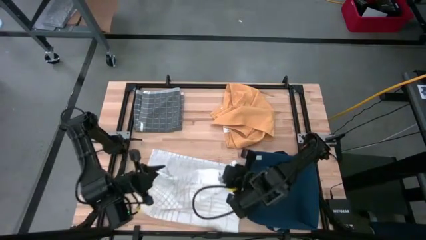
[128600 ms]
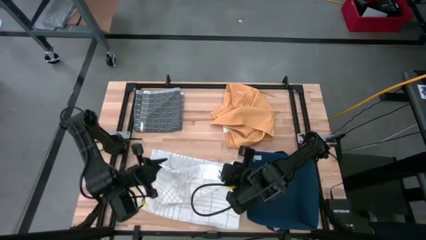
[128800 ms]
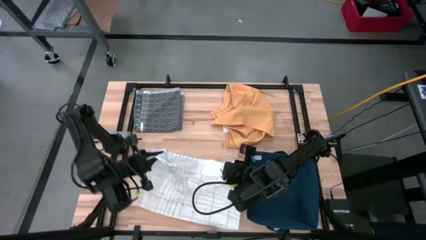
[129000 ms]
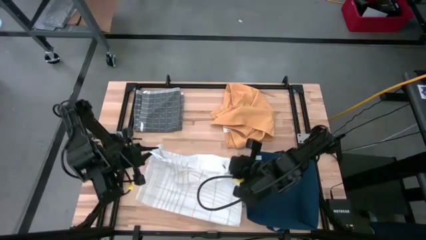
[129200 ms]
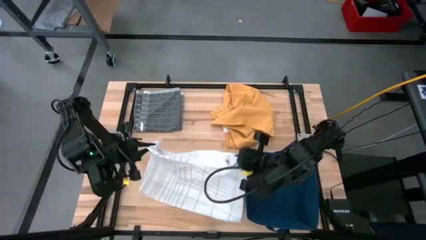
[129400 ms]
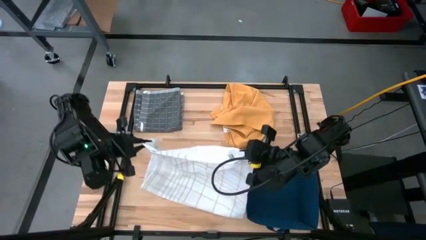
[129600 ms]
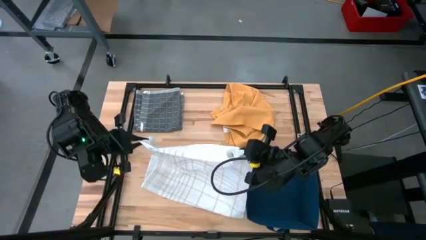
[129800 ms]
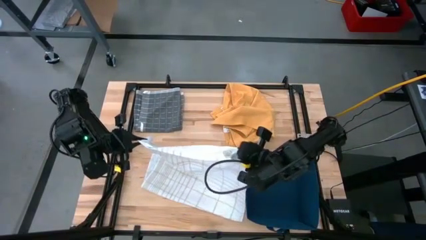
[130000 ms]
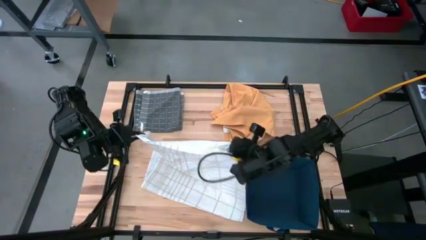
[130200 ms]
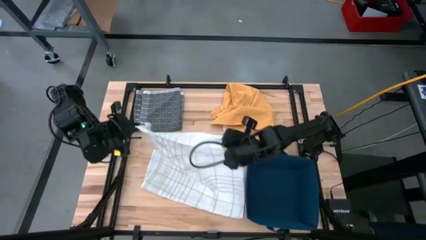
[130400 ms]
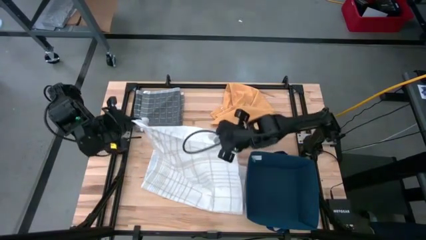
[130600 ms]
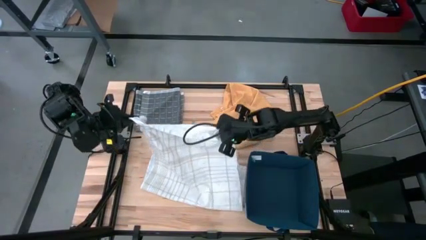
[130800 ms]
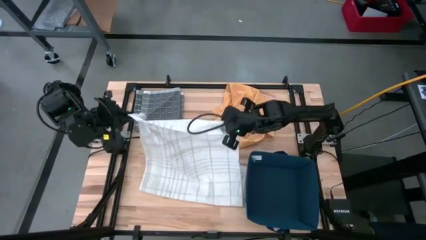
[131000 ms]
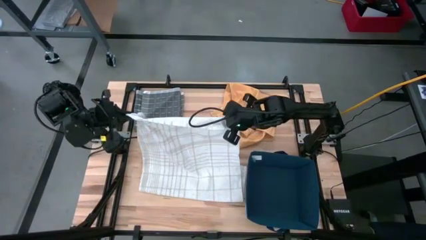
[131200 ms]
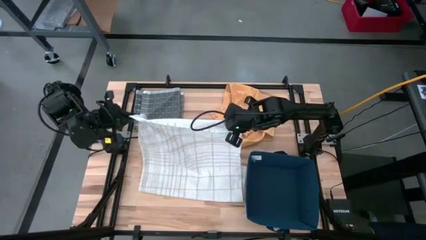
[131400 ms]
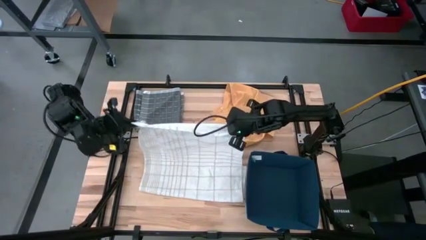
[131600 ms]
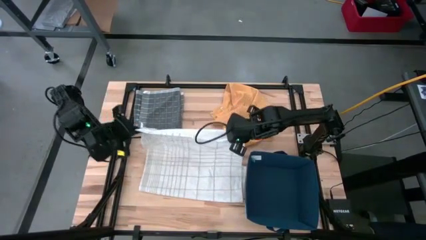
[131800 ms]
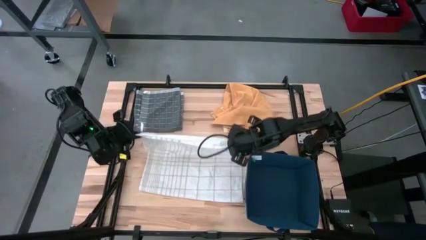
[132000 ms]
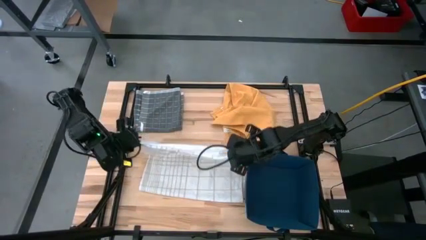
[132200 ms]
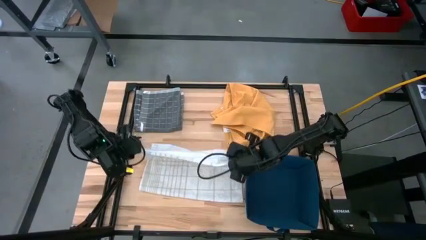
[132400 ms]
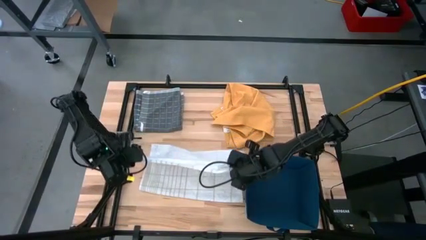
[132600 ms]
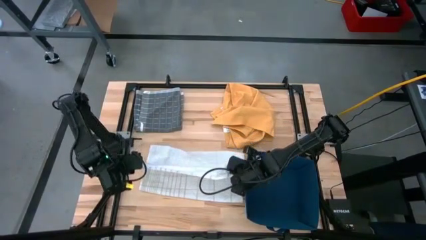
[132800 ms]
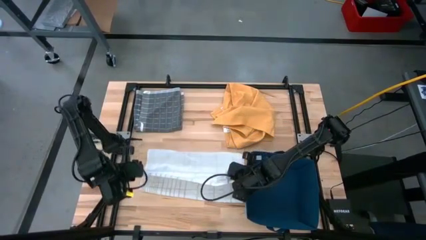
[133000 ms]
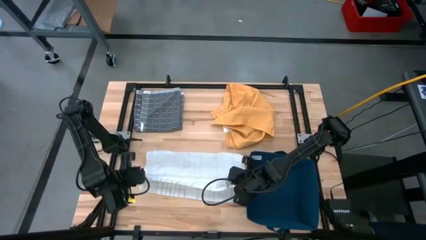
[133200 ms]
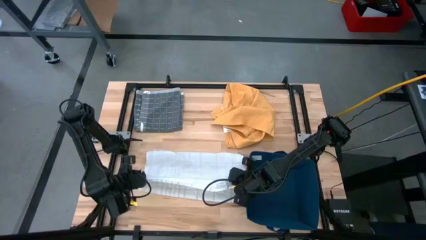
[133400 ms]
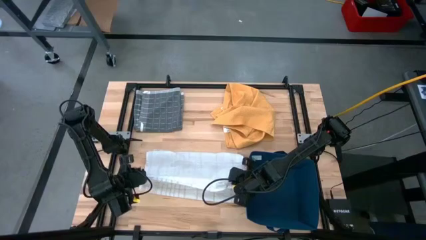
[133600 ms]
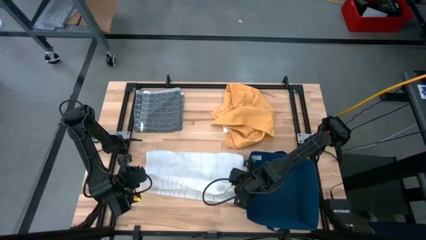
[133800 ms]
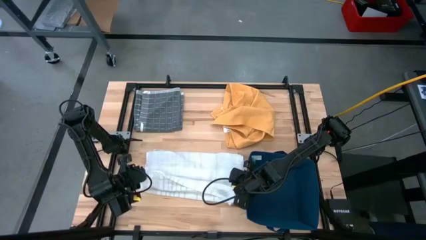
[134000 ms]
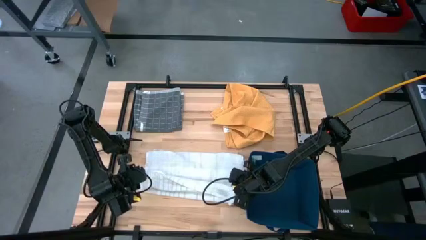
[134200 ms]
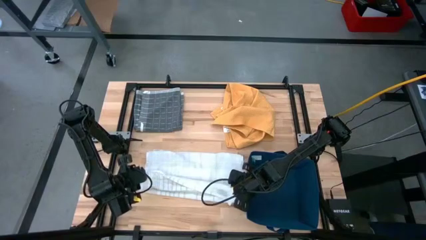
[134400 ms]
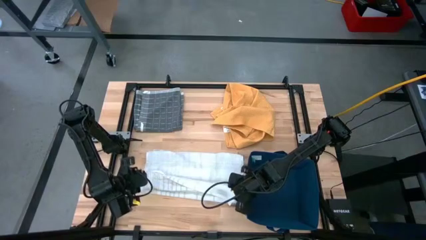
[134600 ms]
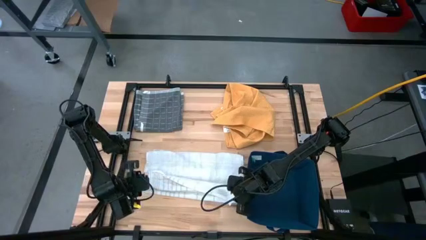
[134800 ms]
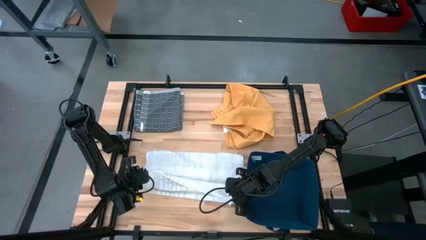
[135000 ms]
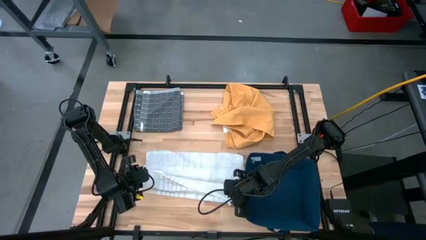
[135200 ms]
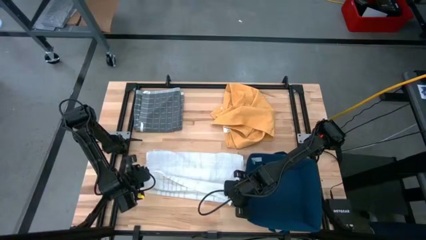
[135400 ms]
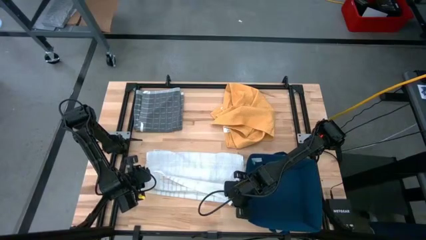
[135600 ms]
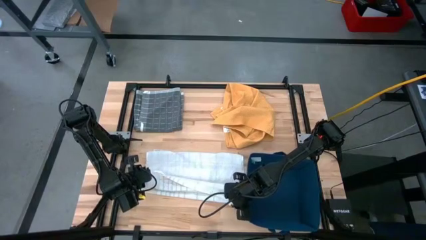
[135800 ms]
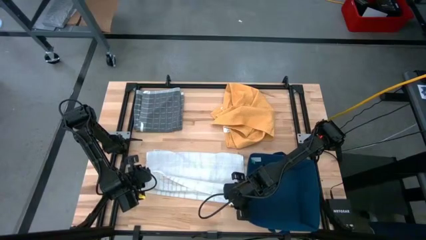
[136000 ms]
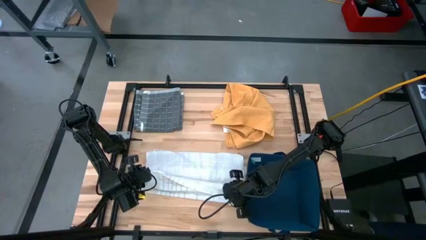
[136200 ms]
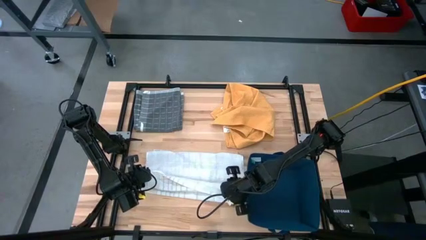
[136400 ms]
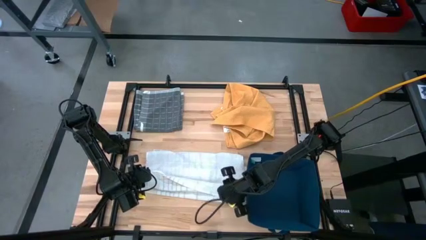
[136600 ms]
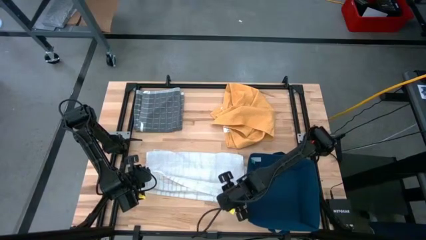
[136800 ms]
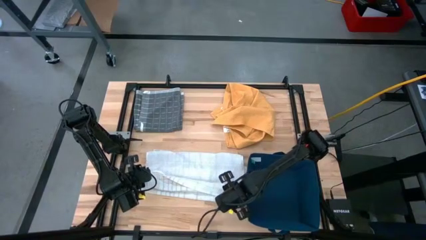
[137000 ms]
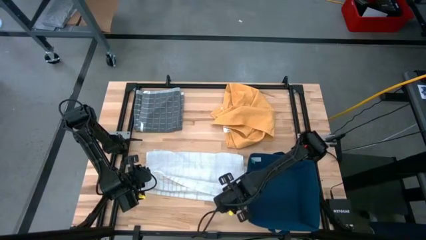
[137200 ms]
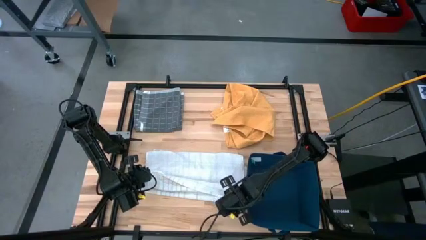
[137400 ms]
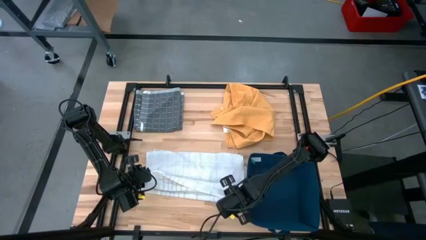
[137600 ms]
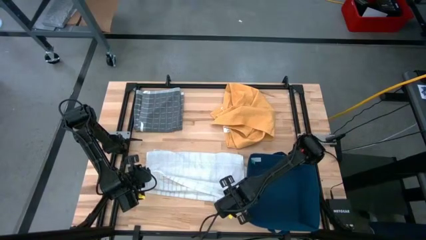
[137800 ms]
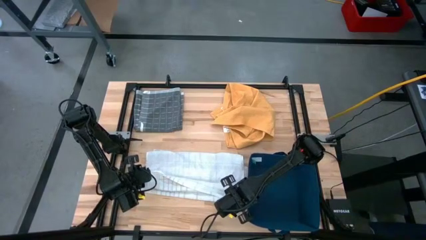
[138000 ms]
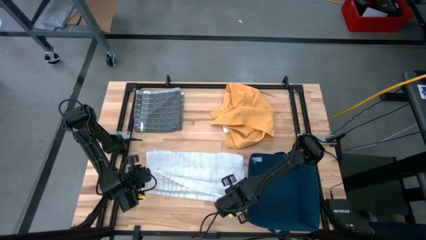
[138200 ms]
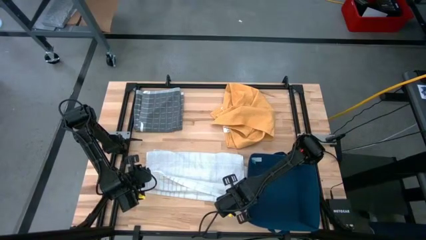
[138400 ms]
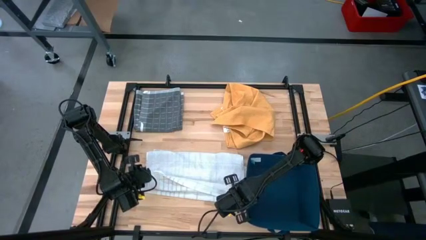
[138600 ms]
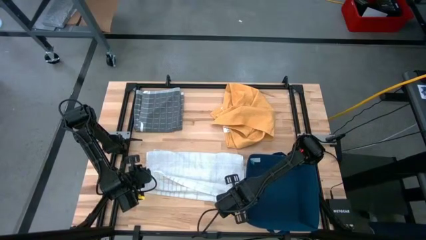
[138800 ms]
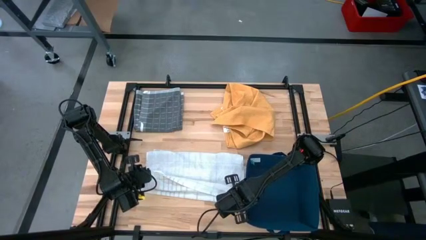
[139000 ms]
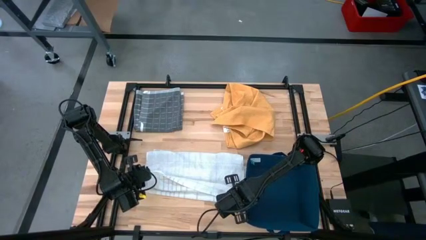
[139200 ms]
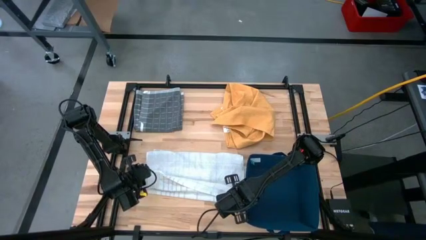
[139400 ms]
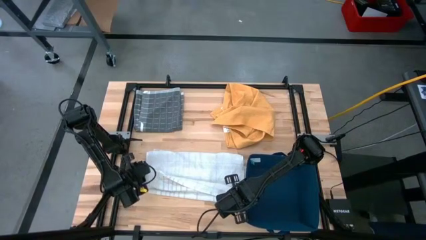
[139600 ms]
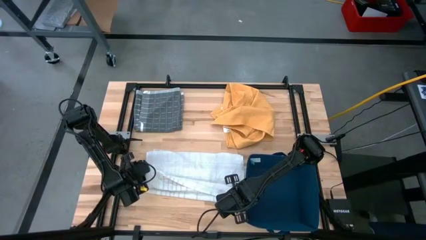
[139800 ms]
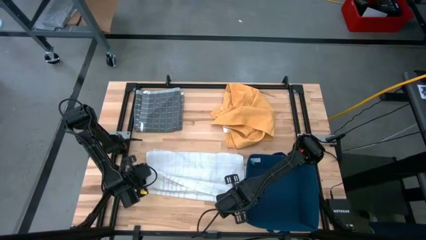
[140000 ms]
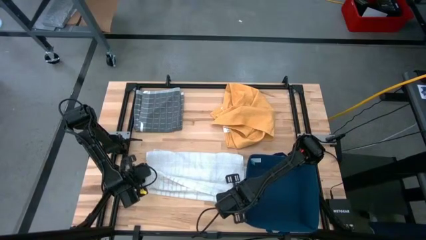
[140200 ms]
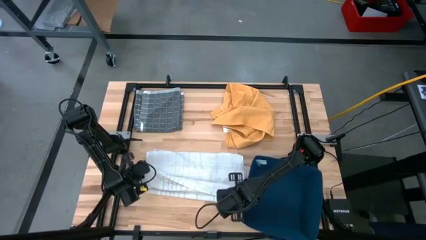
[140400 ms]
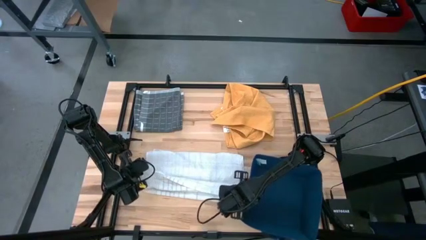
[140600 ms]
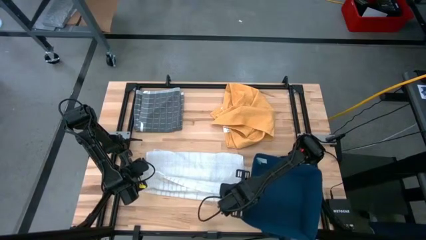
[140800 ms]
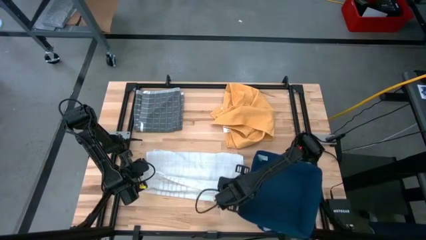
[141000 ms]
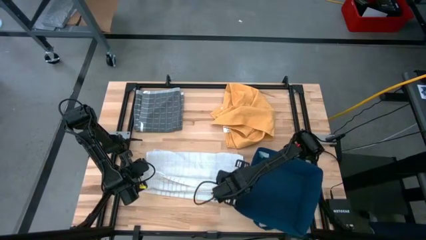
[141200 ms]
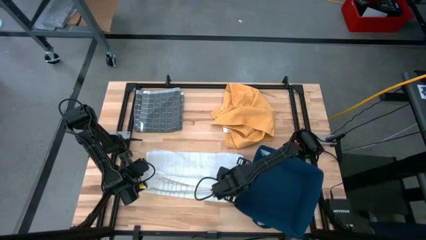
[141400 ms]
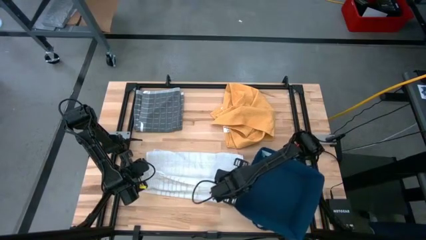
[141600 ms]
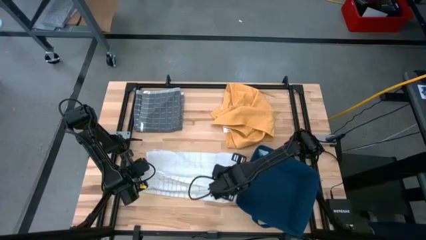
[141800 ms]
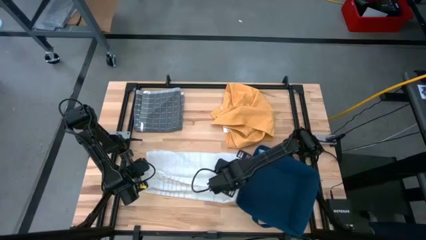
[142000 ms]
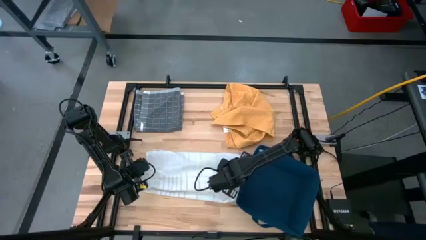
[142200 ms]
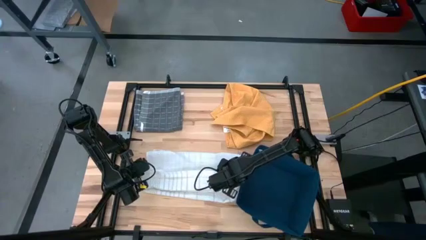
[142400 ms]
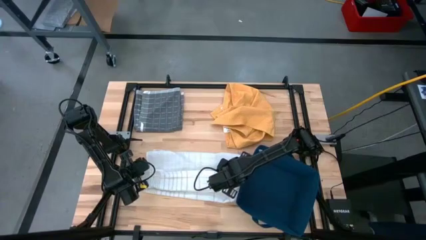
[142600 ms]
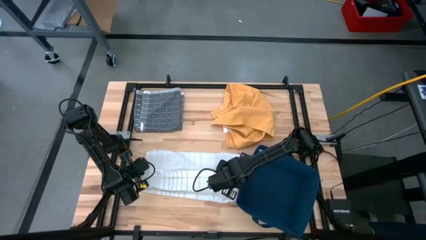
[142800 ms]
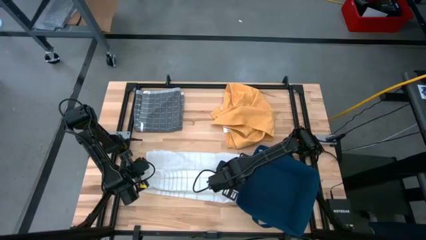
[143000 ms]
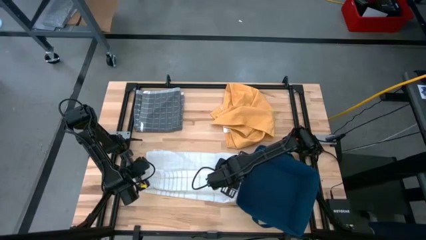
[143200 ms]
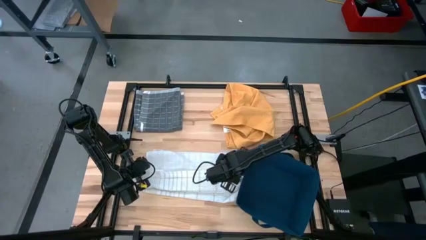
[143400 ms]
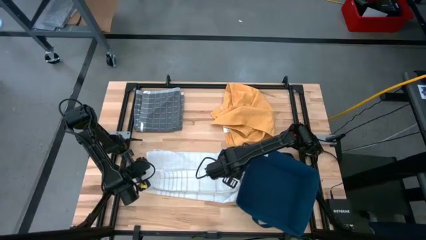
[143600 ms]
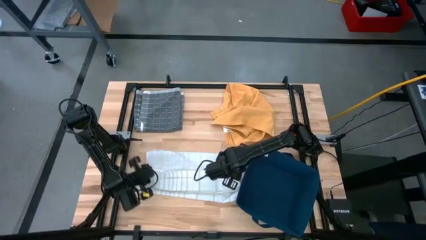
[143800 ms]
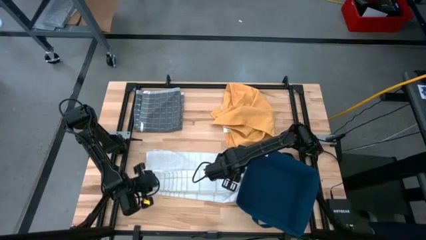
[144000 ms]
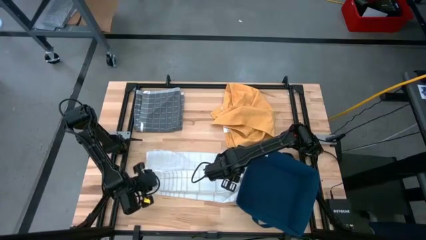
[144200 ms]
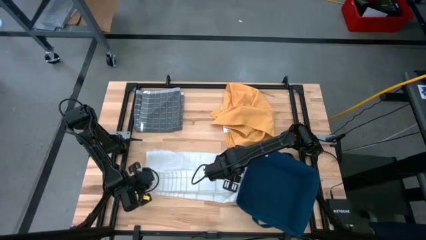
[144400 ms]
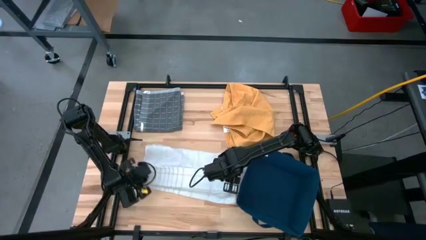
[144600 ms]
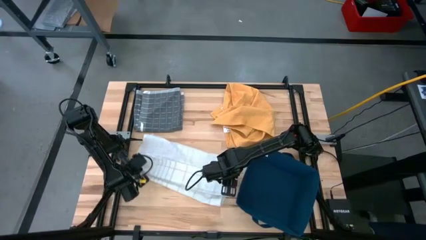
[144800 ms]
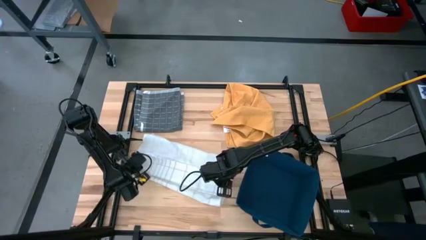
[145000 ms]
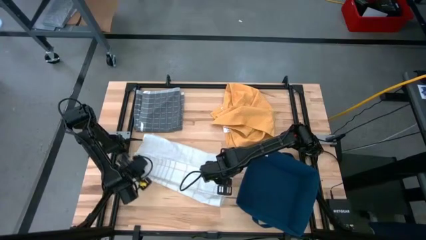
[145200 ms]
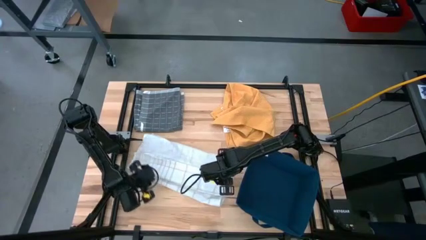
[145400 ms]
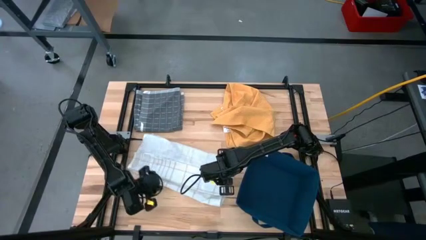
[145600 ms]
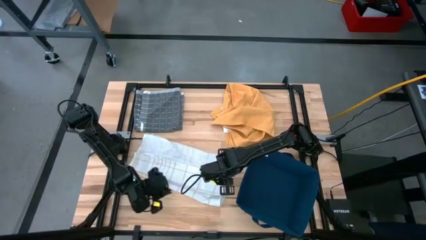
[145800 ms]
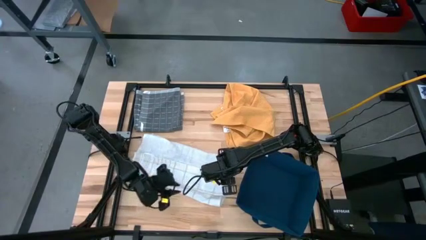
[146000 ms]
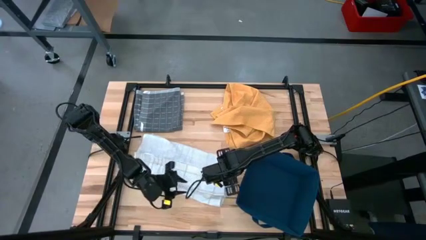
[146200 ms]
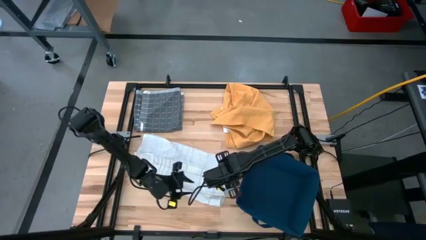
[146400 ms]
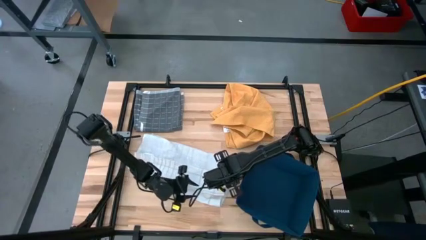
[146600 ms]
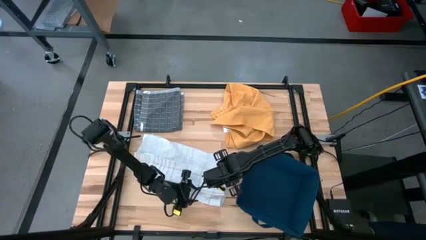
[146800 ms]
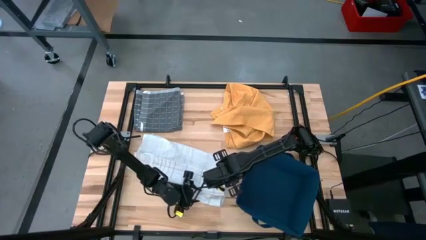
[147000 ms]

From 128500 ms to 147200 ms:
Task: Fold towel
Fold the white towel
